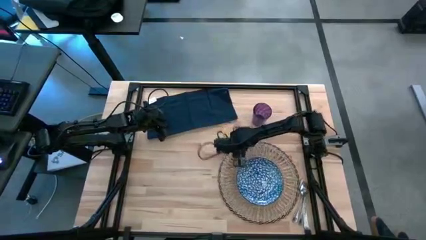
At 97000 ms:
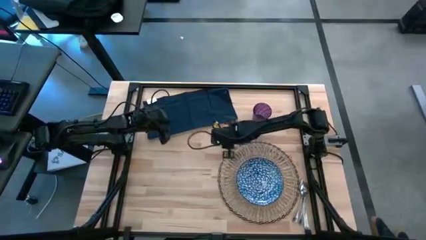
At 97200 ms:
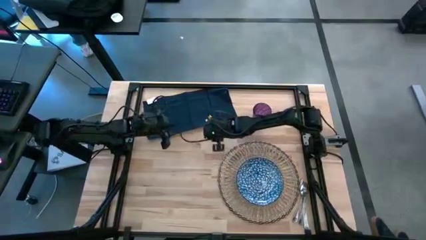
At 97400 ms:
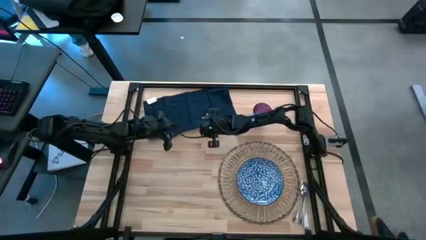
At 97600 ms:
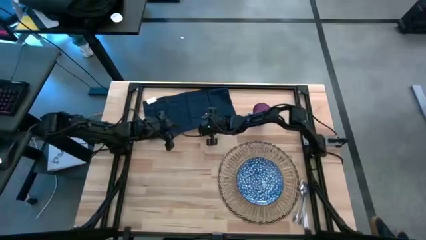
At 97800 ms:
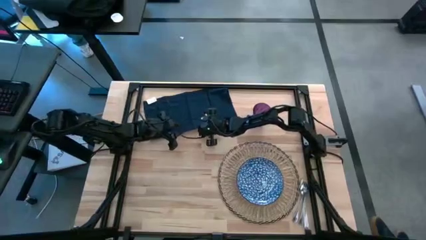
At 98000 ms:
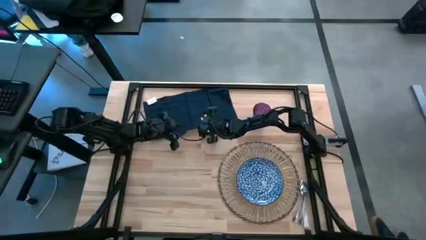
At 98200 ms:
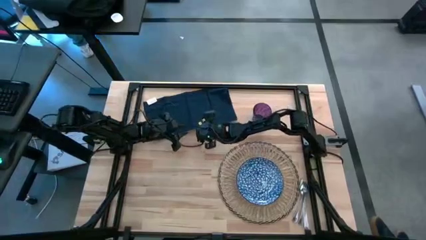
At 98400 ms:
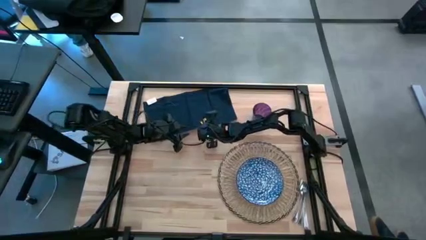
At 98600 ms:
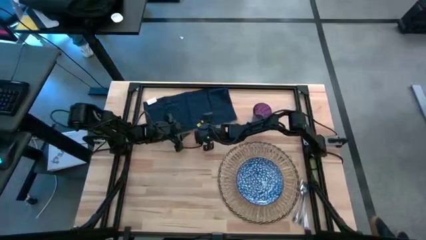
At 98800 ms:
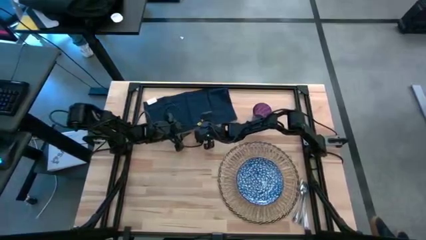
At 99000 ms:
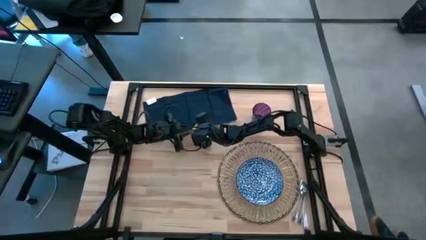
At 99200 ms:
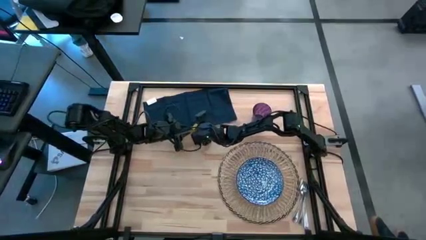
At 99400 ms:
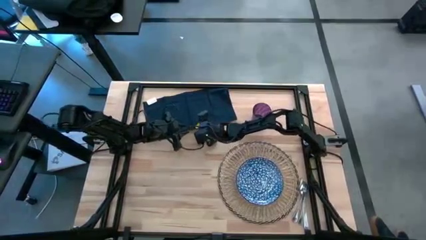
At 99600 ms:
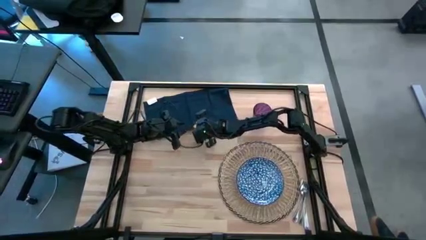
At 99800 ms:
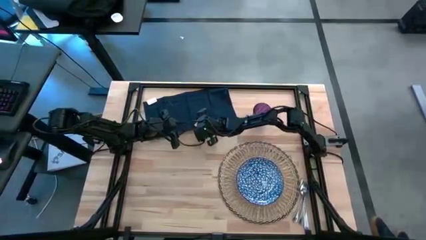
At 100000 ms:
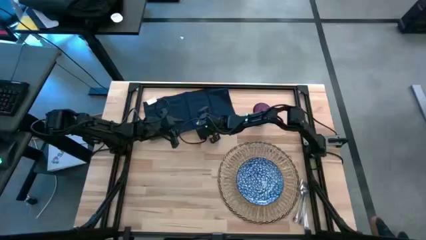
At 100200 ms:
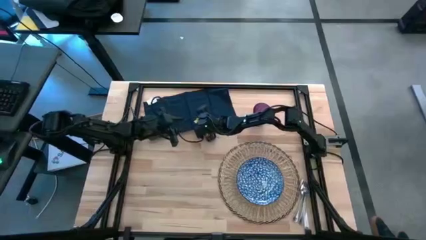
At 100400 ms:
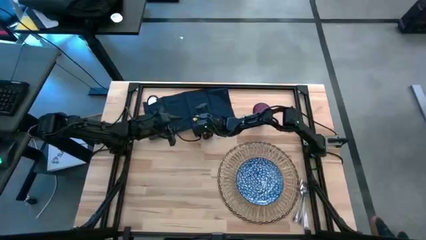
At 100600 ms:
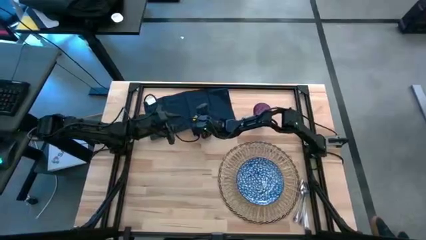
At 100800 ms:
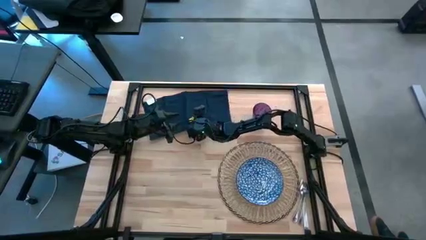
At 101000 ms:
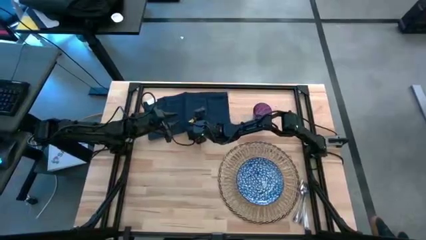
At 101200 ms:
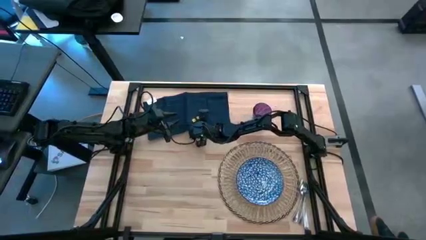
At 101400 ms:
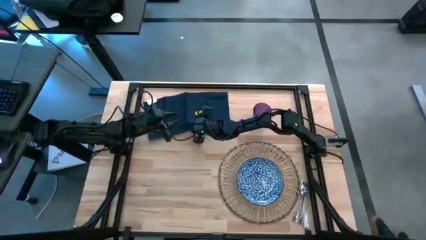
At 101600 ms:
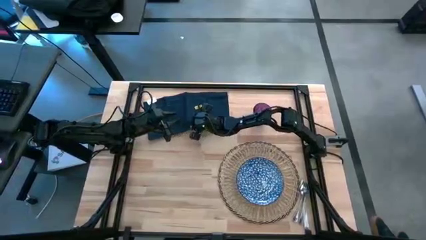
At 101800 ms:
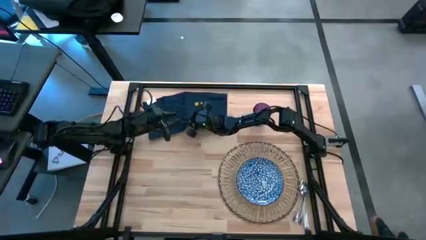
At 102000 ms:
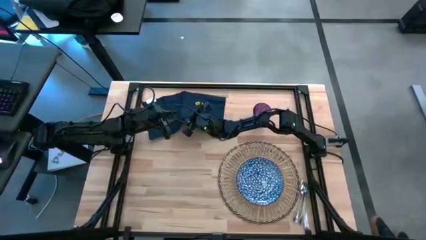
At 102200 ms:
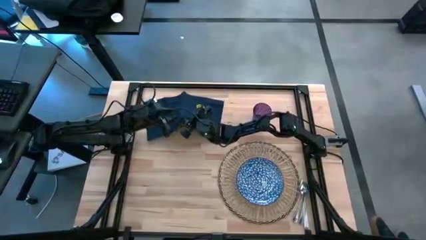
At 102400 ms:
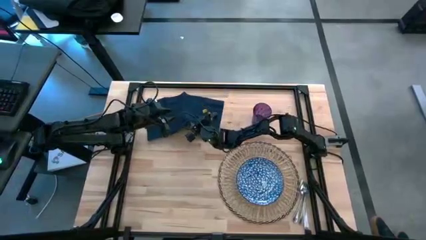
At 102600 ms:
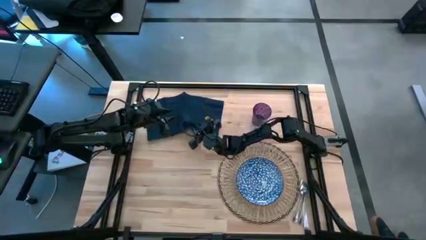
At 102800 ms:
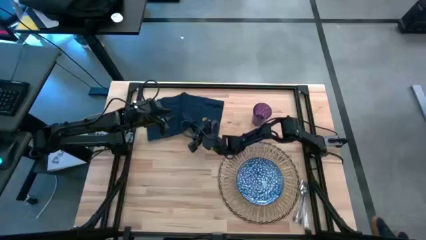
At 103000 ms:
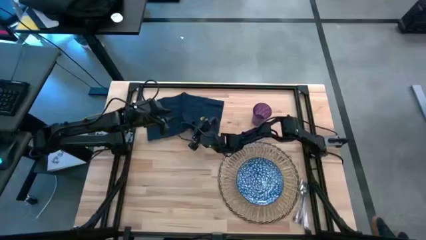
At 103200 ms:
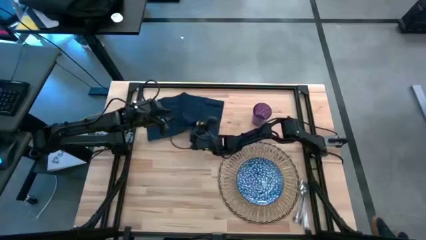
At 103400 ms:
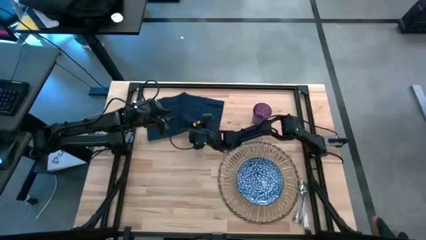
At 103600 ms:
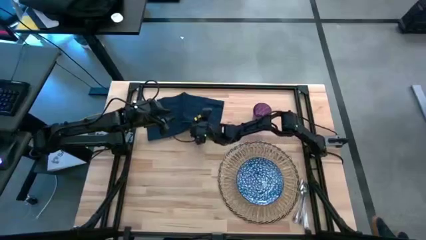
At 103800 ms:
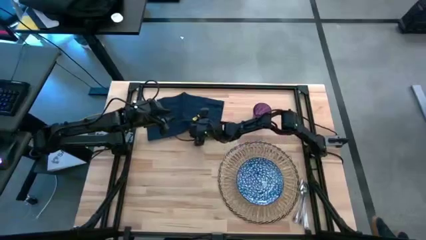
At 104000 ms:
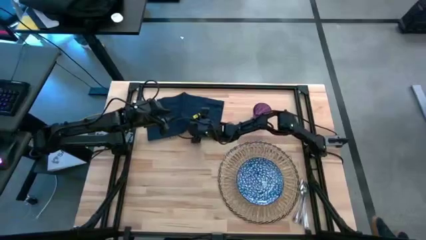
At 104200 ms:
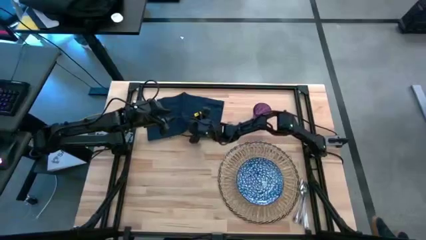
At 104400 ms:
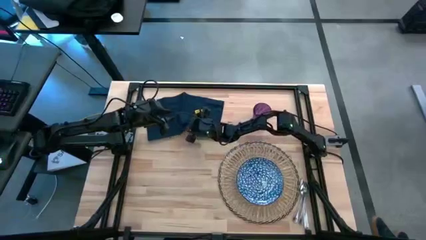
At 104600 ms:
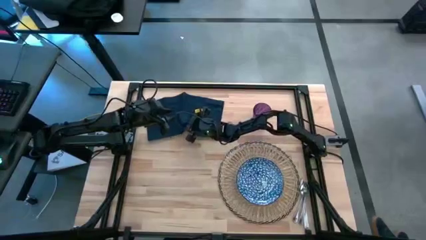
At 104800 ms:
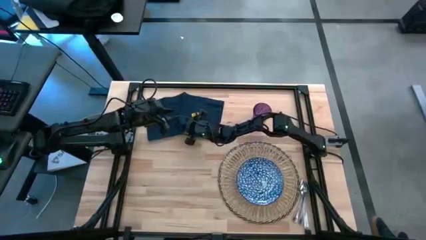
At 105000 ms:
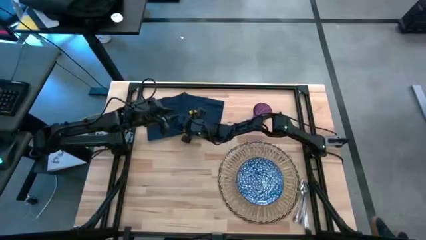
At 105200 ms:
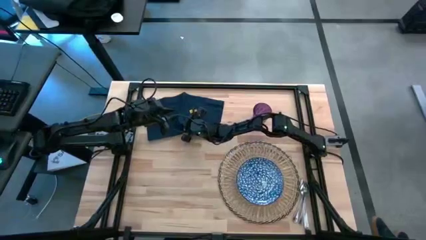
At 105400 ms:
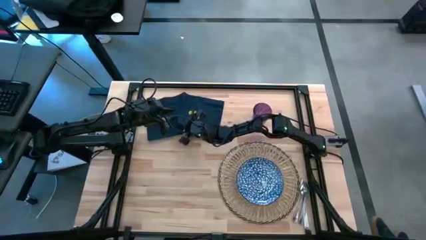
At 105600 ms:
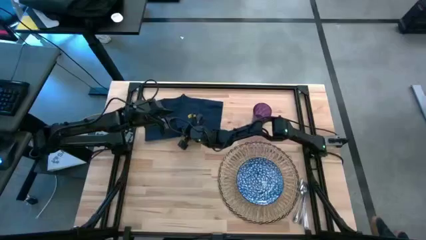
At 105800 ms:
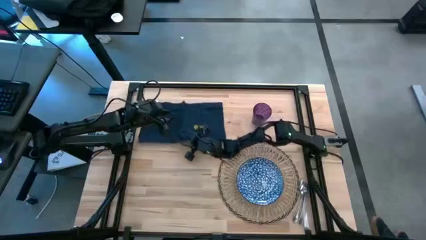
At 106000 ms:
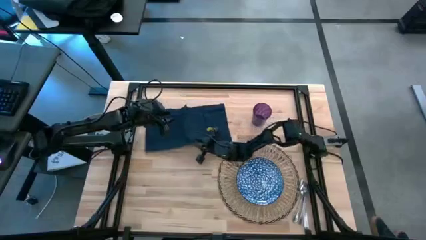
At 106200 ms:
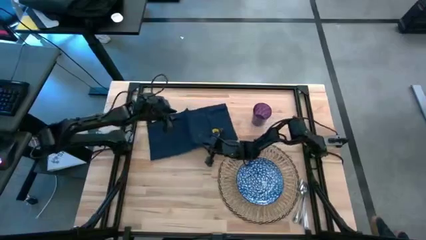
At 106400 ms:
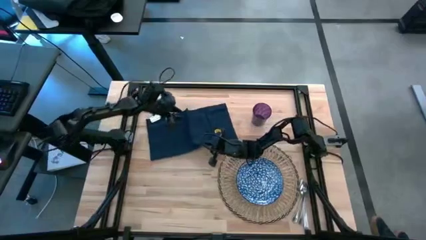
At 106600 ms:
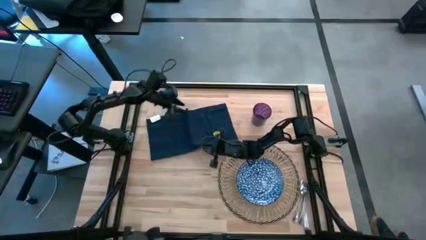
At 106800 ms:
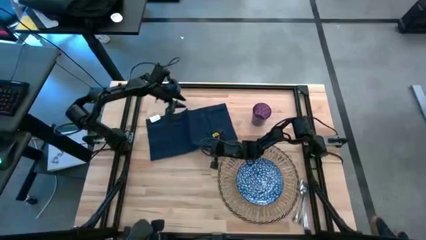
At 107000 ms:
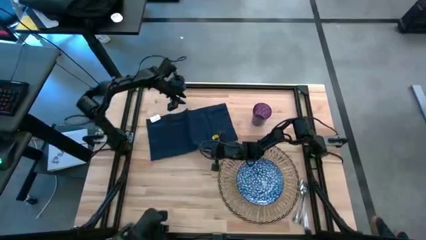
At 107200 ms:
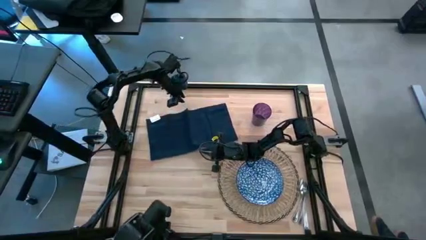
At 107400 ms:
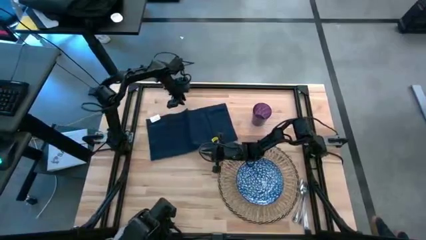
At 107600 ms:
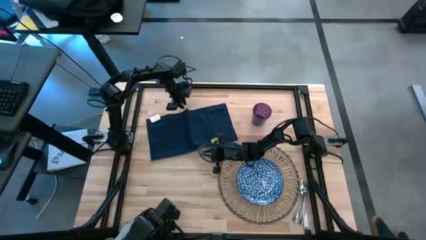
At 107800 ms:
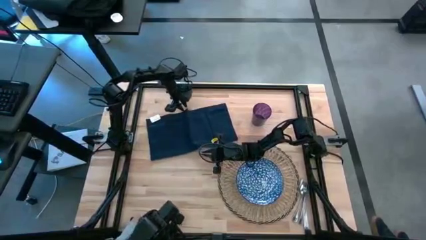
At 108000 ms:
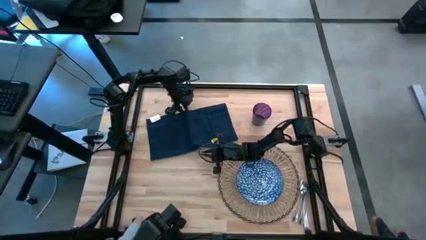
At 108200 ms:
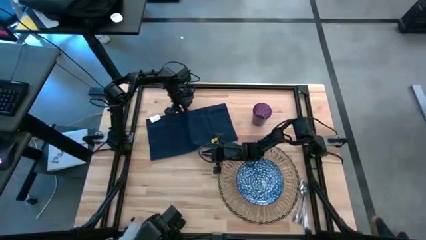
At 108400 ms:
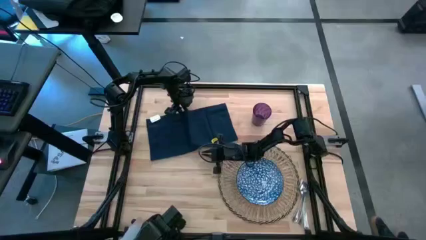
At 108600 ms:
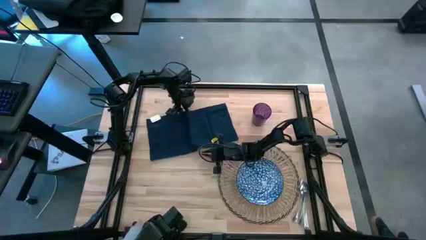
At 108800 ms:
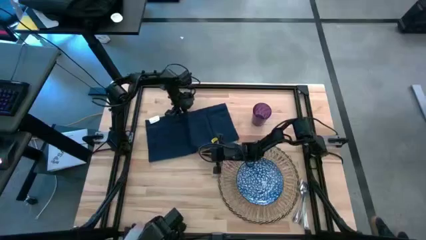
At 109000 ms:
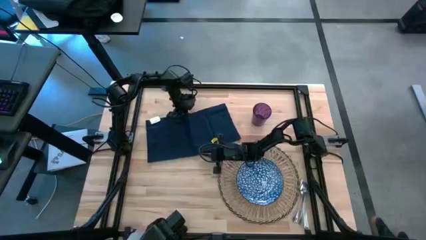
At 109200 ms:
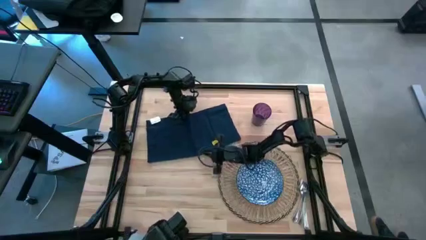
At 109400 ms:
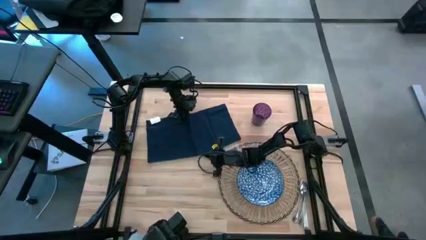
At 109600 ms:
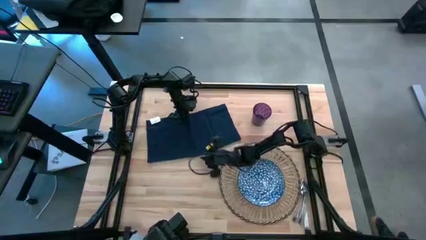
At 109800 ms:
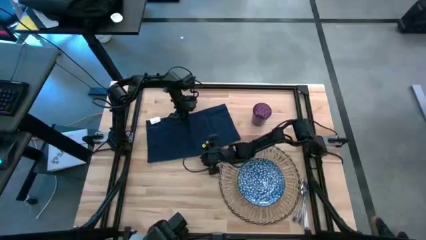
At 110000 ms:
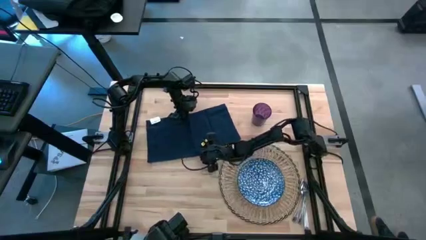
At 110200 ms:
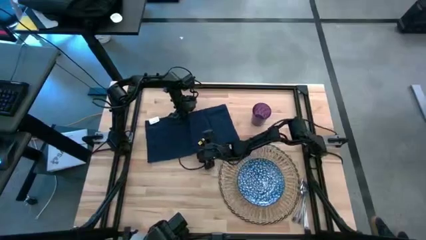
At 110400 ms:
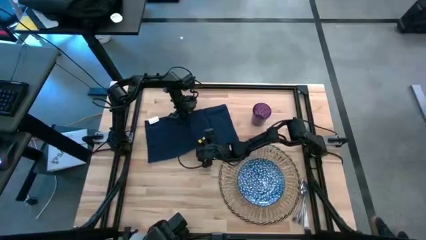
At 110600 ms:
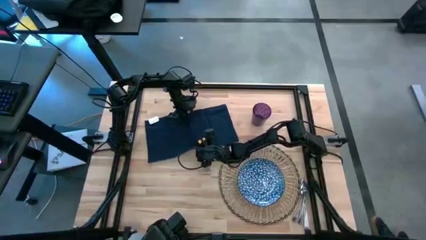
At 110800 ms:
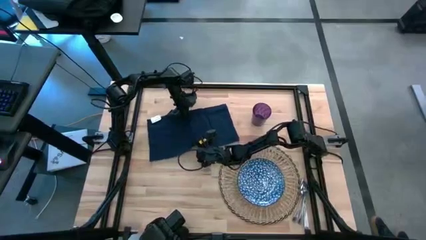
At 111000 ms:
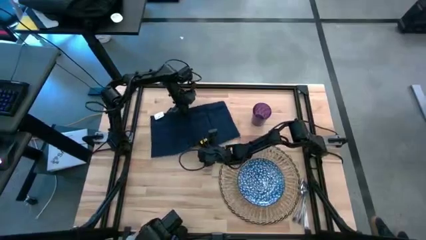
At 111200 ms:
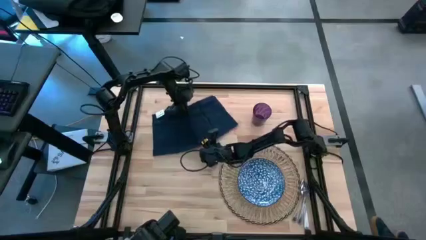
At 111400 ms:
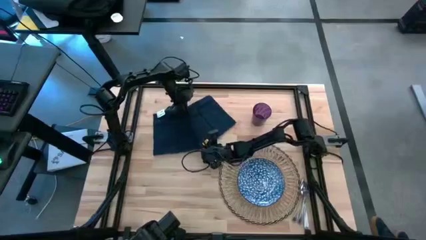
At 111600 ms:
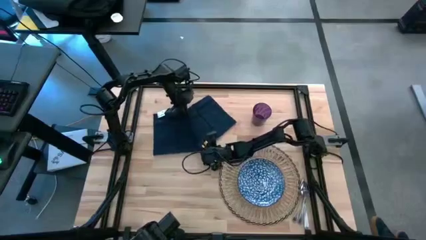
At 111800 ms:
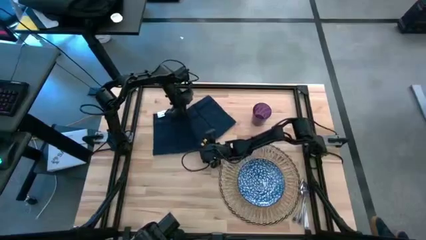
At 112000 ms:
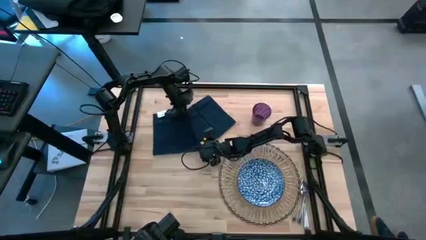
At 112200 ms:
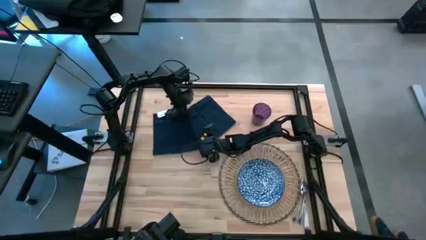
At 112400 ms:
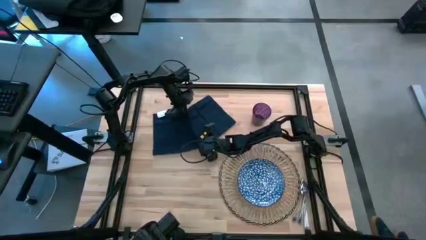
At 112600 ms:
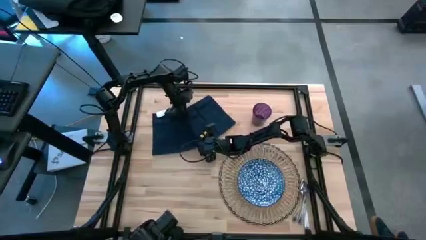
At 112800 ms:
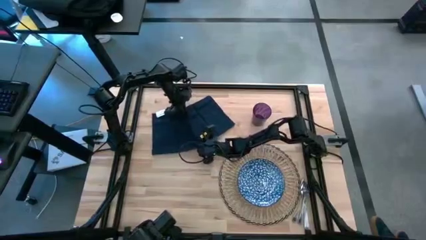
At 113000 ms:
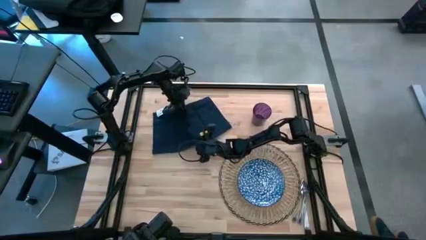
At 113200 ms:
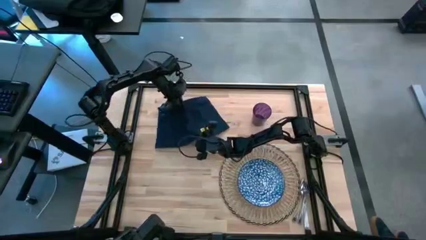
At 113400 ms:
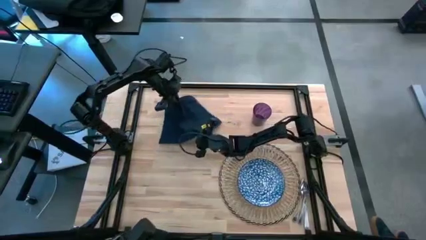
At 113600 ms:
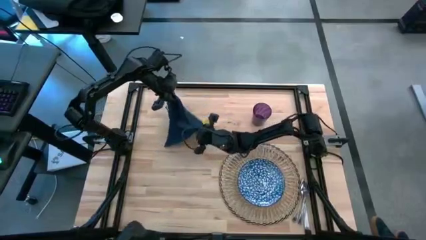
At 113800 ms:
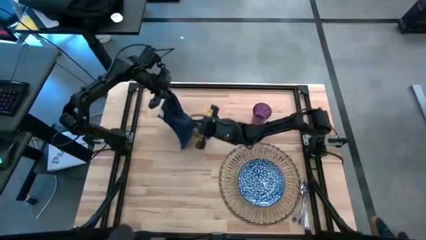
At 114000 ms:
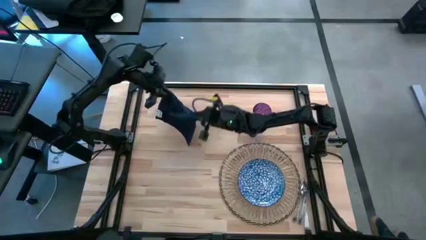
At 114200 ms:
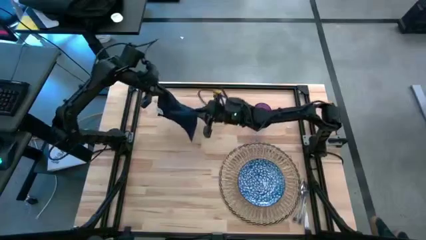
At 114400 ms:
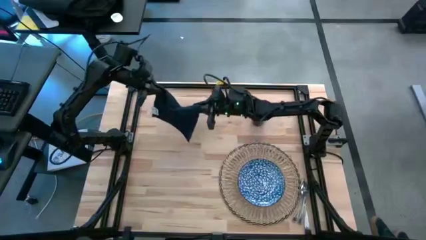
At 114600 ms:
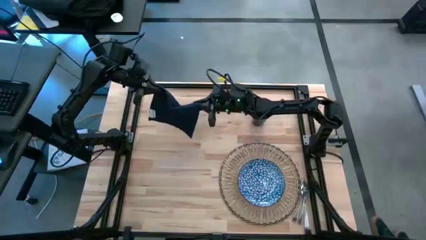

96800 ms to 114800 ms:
Task: Set table place
Fold the blue table napkin
